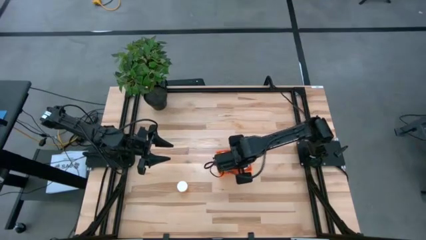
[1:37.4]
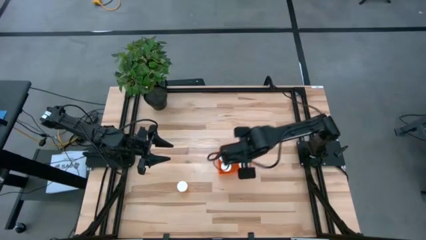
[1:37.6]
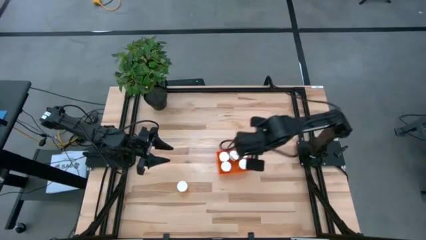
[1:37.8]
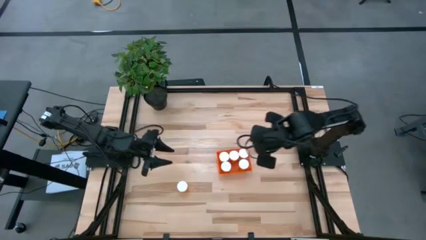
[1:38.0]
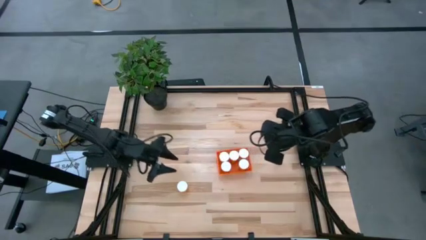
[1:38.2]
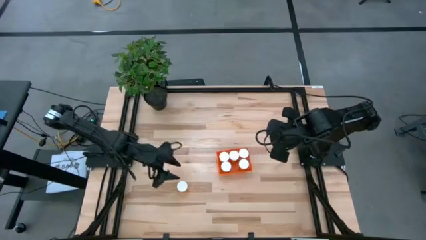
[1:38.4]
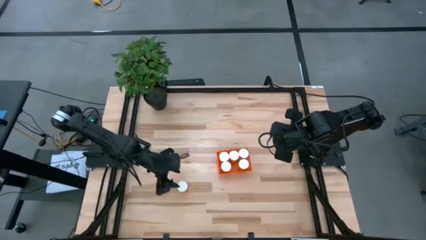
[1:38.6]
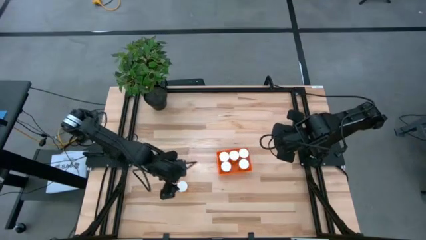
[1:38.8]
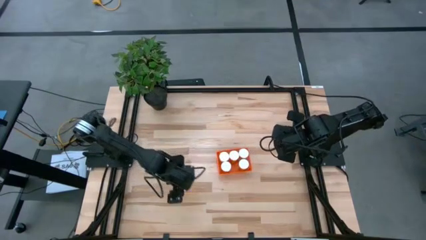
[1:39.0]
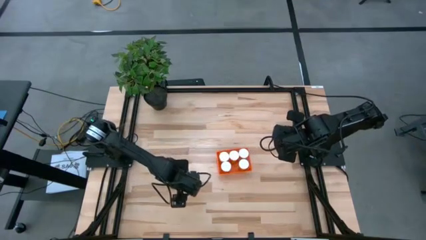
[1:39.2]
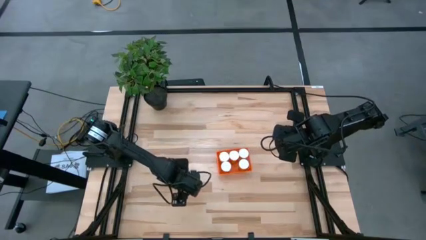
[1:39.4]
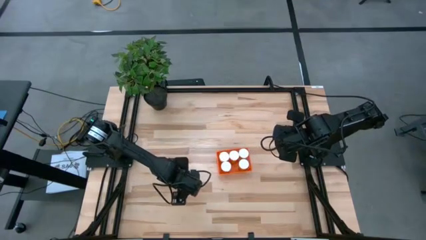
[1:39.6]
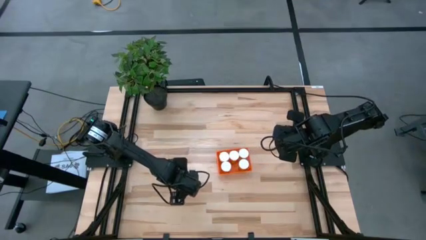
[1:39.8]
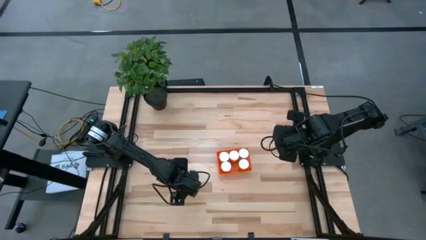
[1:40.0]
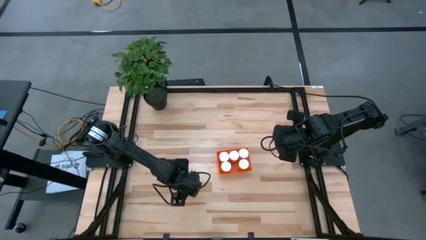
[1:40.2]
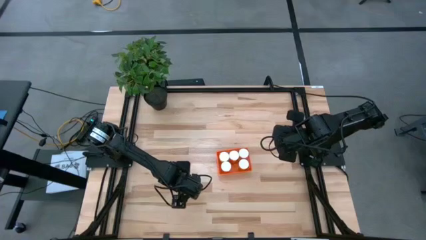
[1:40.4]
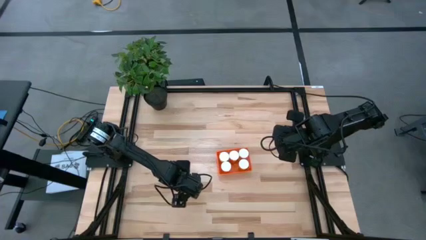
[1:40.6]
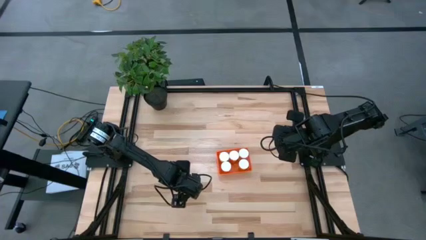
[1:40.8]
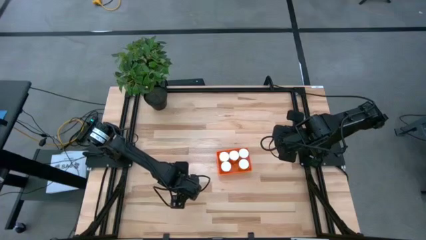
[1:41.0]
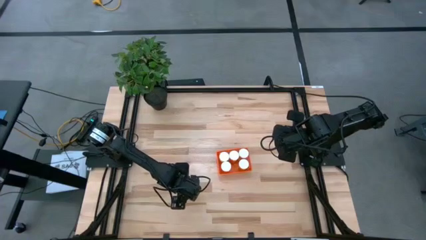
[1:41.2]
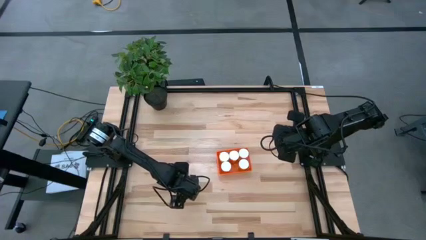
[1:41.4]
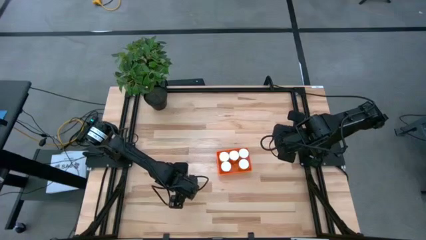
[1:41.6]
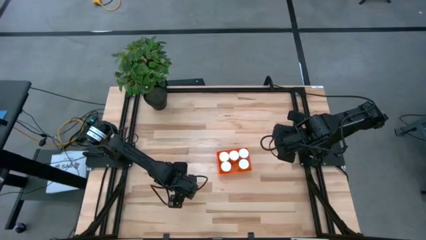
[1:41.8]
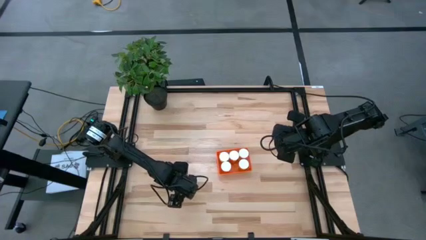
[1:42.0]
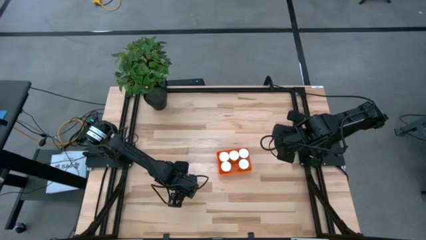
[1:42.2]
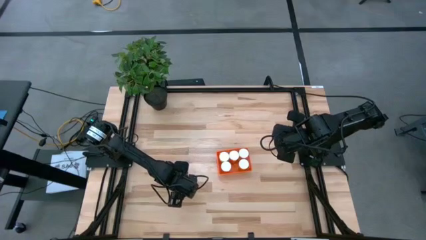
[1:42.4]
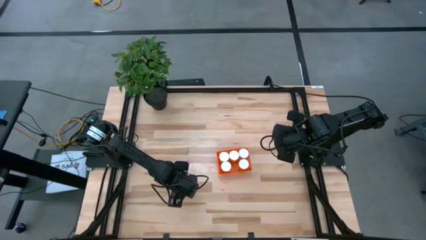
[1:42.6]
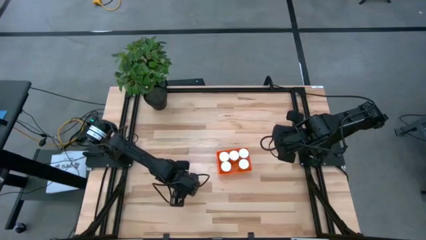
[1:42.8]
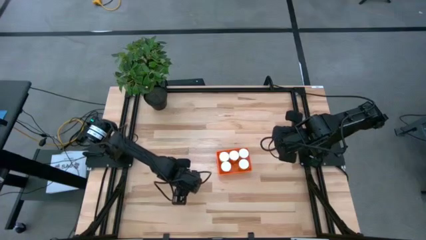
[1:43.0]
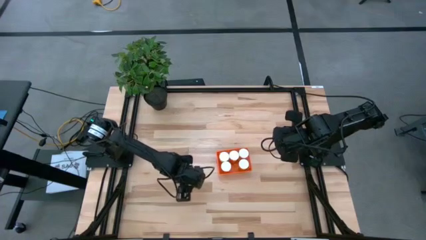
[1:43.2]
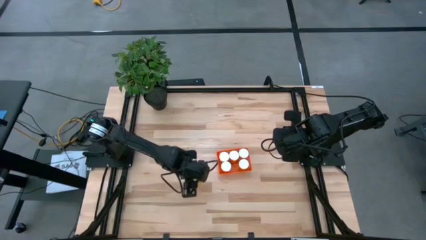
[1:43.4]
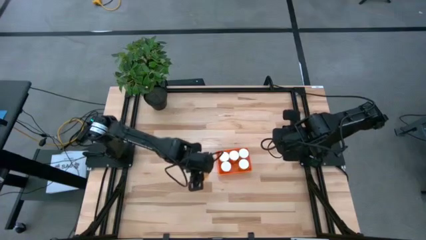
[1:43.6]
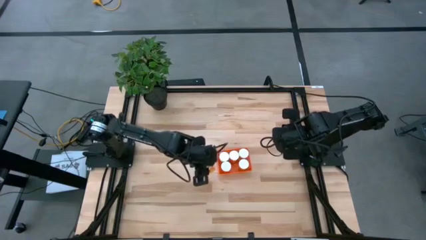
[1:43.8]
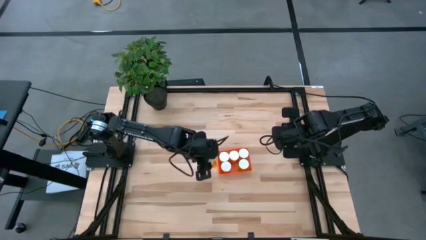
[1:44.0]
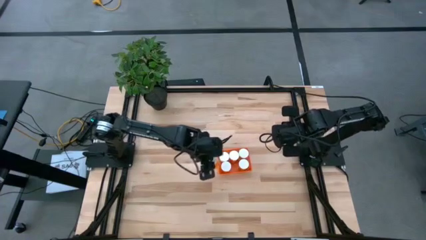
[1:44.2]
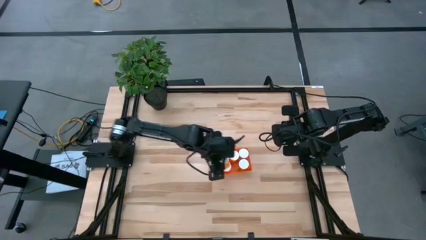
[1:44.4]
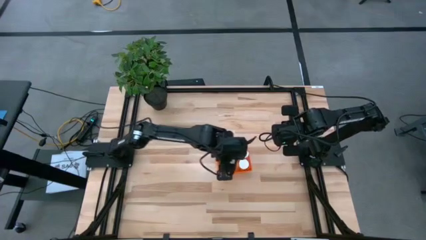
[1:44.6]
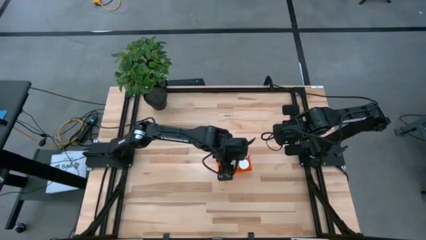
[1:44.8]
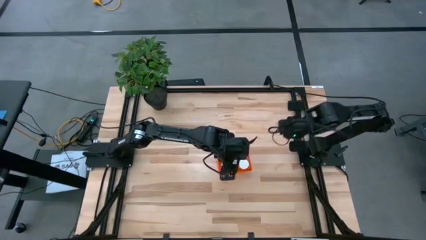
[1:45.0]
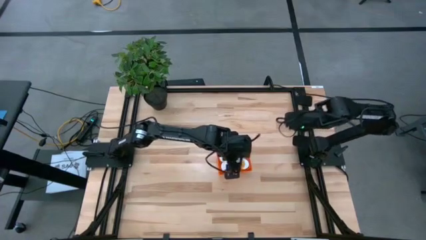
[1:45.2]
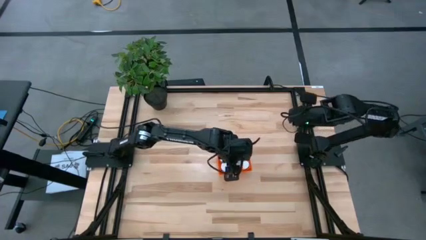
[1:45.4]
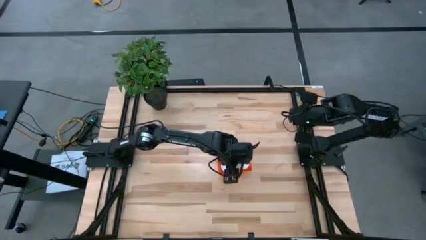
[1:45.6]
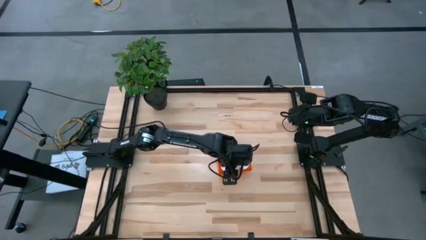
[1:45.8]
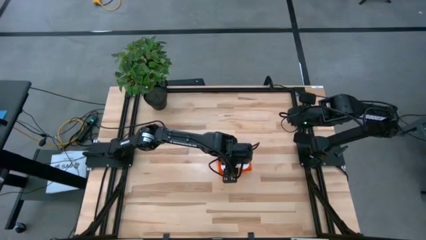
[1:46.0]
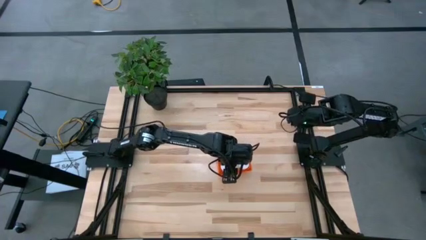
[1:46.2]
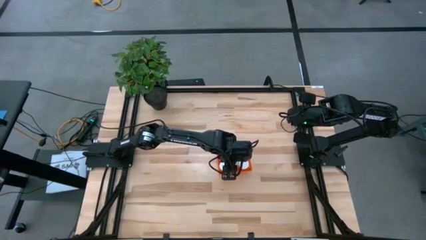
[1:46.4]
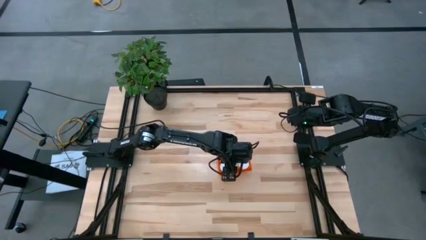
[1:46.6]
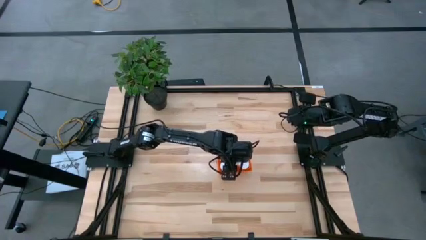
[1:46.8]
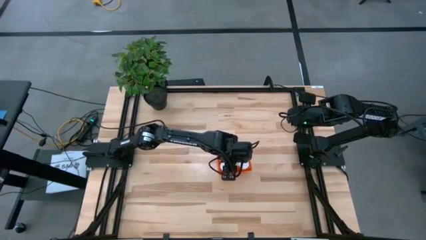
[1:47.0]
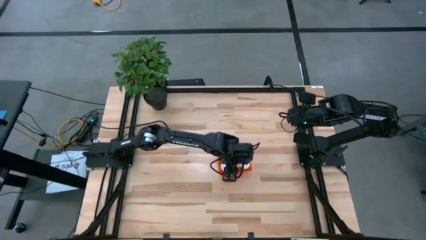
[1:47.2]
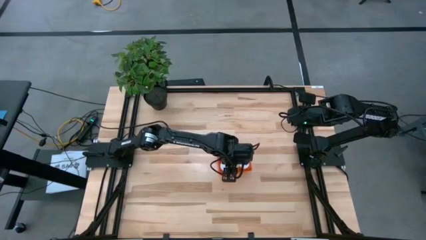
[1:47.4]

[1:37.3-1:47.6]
Task: Pick and place pill bottles into a basket
Put the orange pill bottle into the orange bin

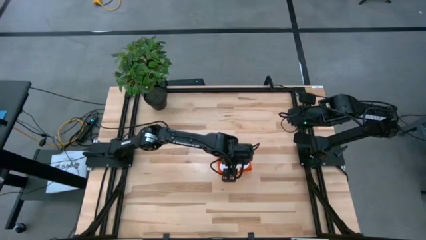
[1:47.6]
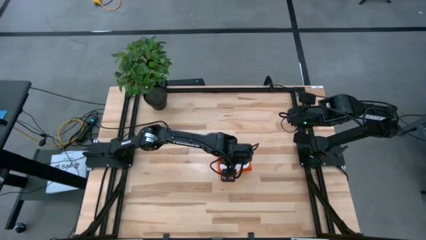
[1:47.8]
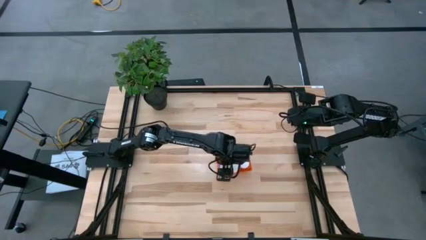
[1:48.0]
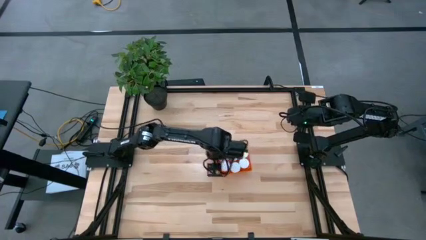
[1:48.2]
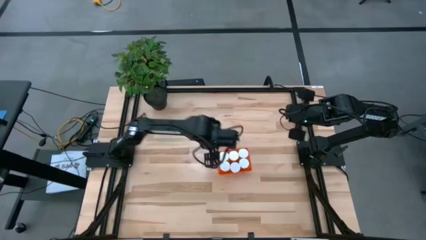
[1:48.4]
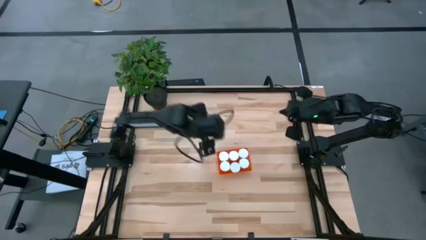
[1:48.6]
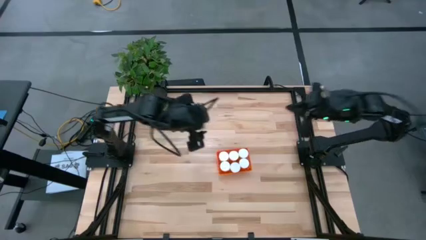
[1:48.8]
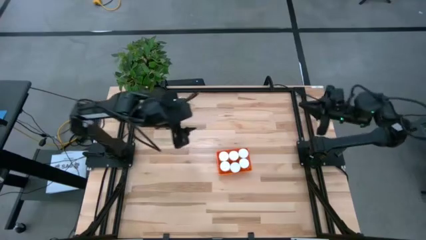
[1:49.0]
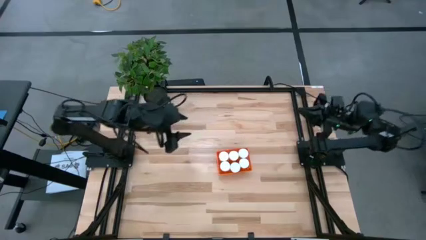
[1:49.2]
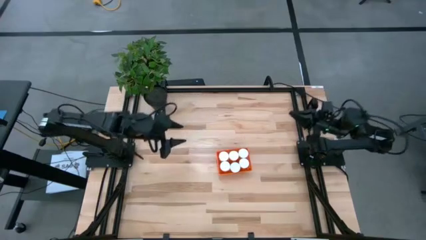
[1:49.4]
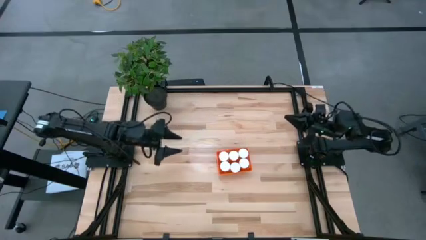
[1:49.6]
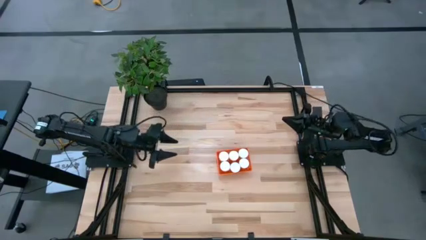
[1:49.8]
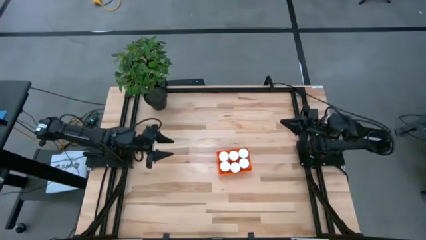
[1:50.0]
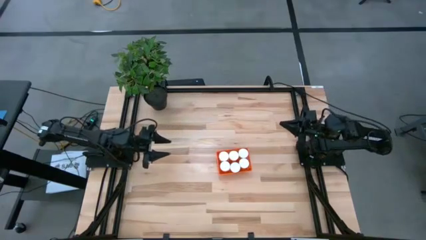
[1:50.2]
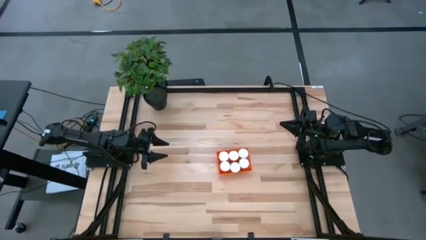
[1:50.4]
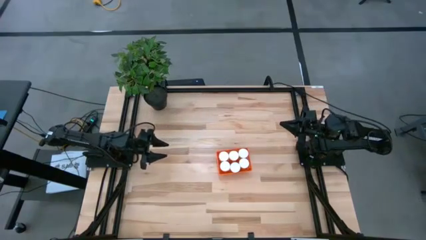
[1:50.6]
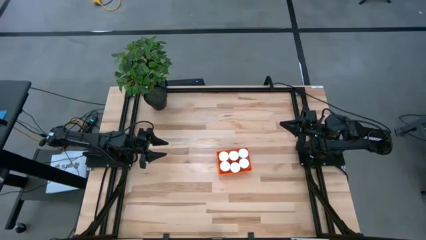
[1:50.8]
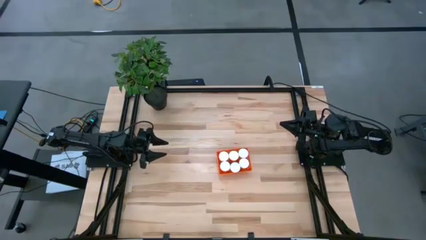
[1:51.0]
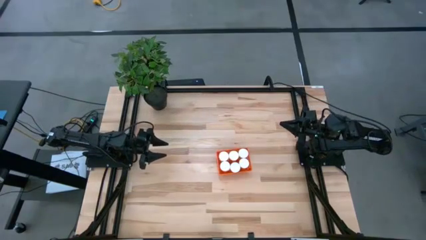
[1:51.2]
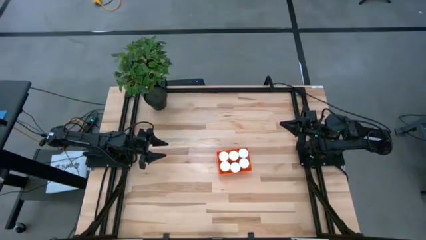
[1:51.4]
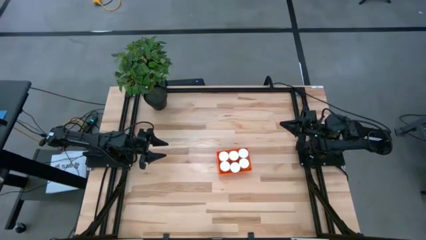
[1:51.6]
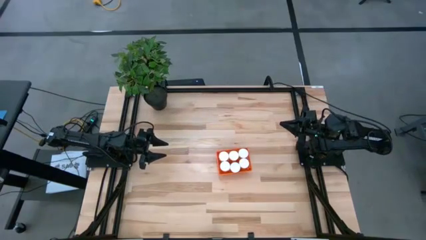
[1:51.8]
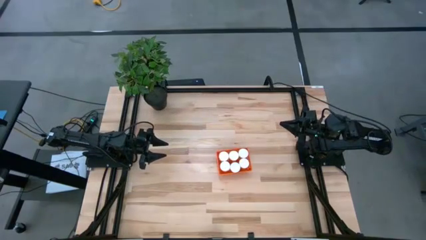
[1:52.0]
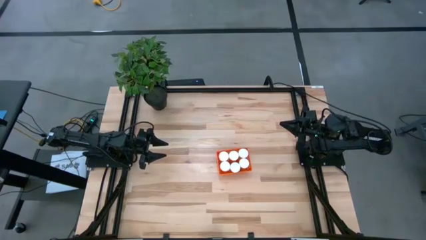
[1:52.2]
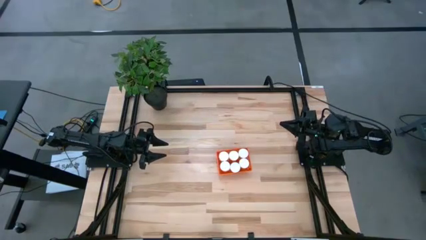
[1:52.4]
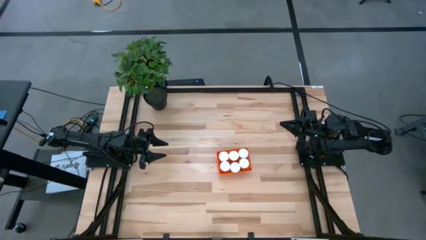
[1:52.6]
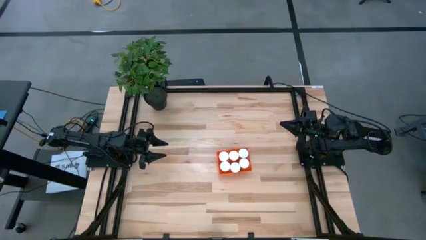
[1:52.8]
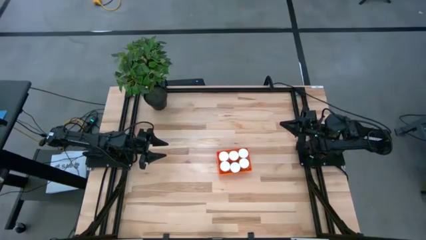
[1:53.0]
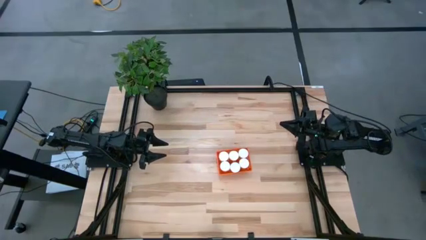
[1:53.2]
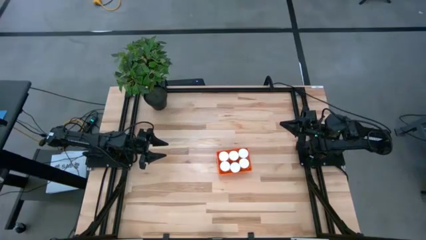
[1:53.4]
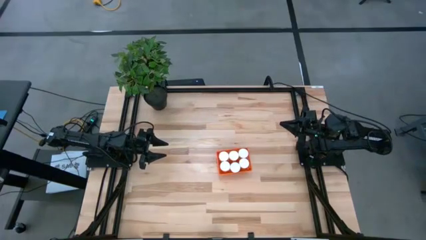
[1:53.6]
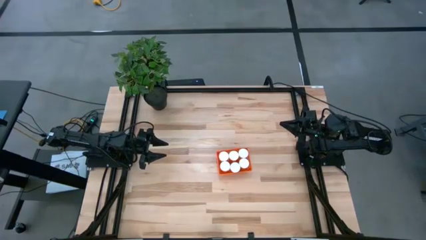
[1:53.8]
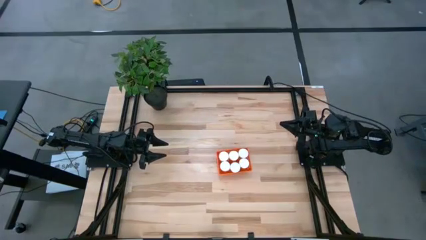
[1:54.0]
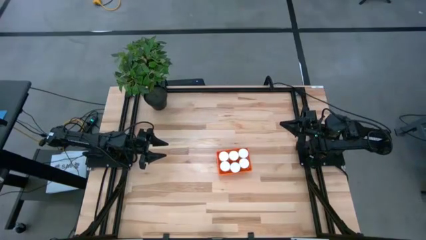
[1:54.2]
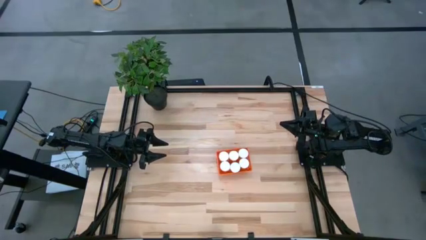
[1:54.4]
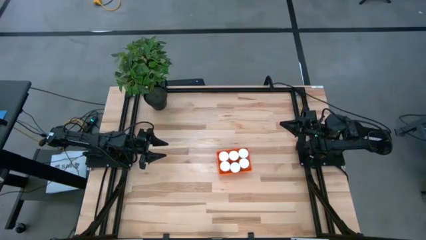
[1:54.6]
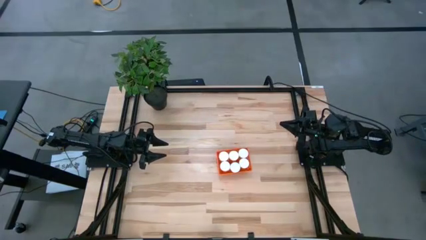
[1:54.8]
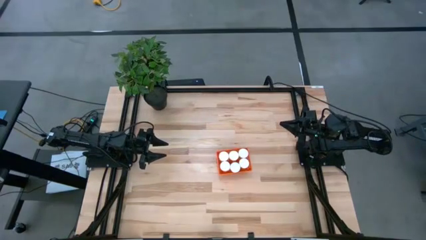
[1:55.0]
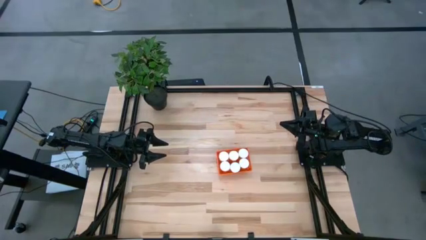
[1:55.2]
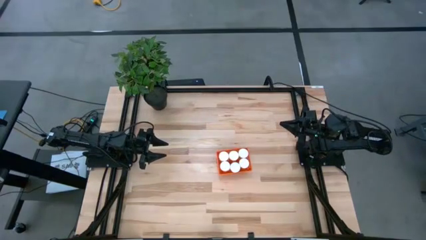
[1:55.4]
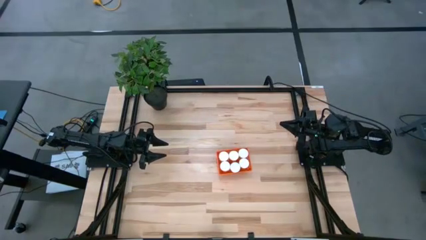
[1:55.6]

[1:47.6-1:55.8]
Return to Home Position
